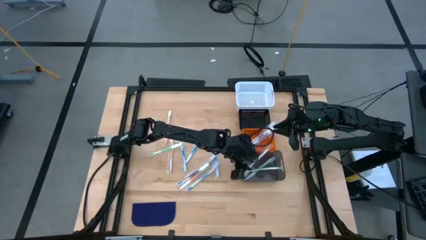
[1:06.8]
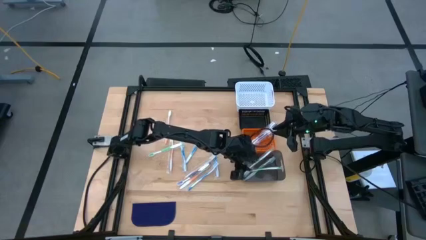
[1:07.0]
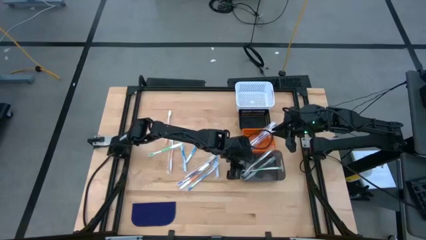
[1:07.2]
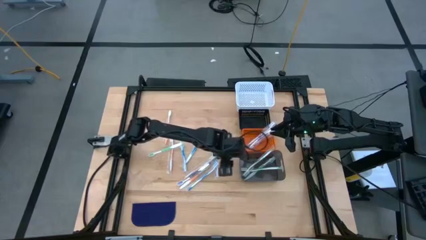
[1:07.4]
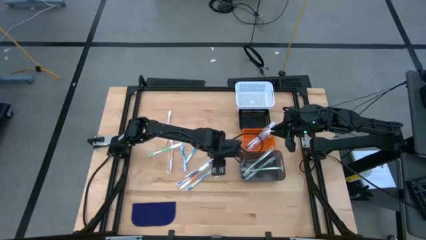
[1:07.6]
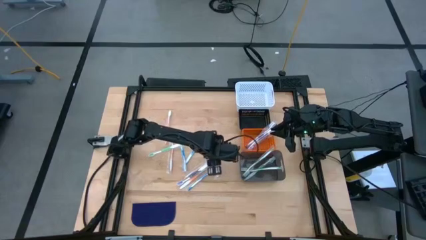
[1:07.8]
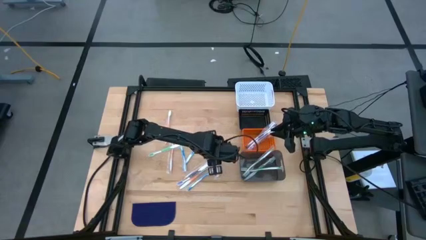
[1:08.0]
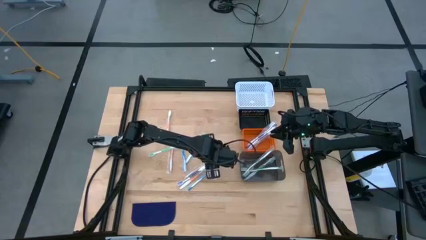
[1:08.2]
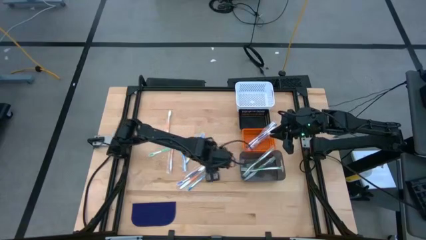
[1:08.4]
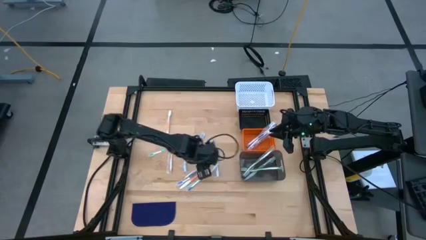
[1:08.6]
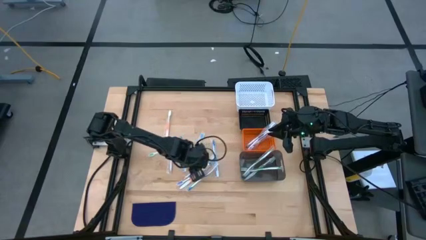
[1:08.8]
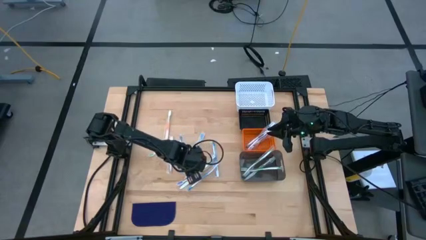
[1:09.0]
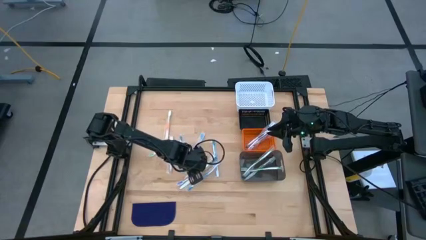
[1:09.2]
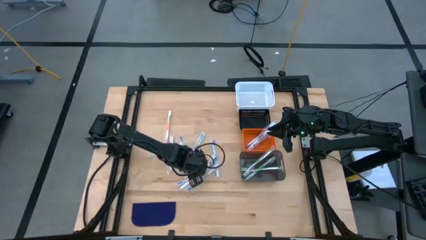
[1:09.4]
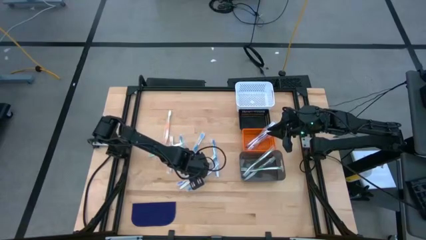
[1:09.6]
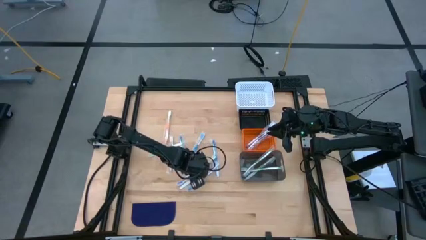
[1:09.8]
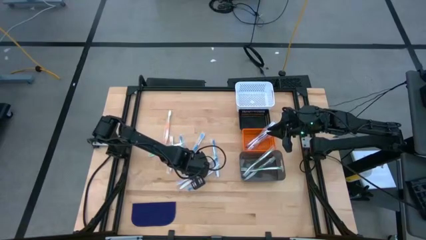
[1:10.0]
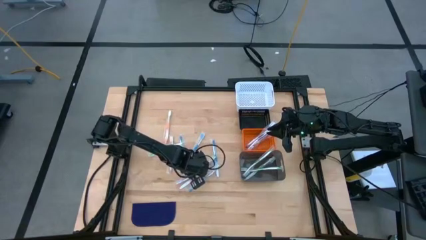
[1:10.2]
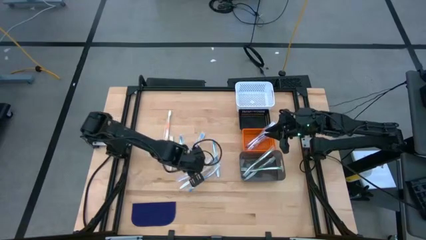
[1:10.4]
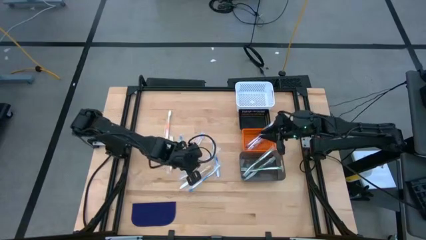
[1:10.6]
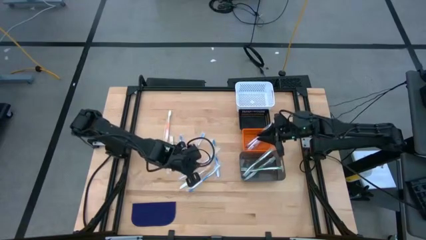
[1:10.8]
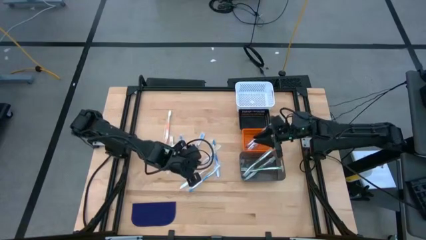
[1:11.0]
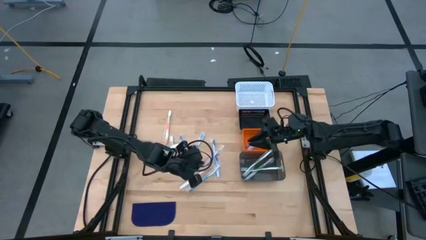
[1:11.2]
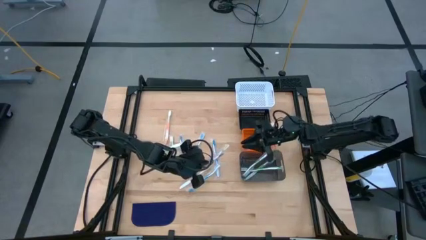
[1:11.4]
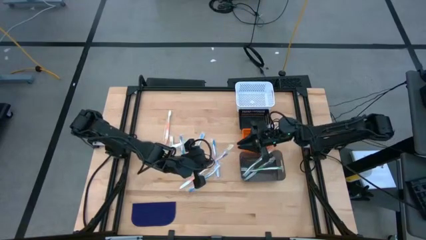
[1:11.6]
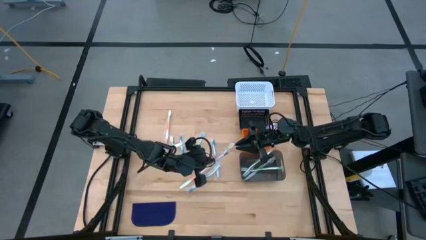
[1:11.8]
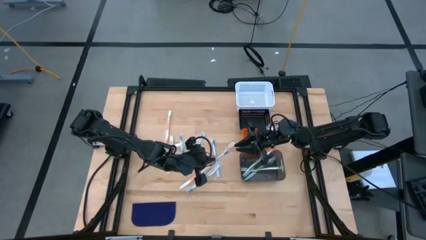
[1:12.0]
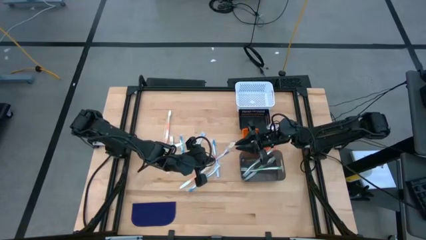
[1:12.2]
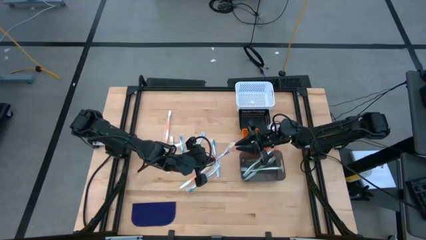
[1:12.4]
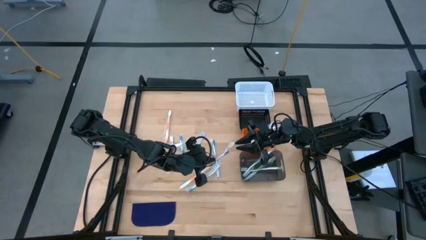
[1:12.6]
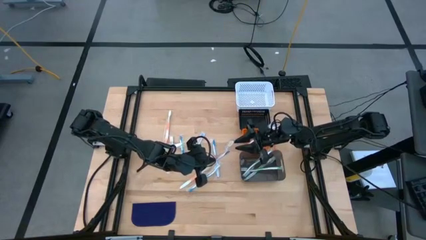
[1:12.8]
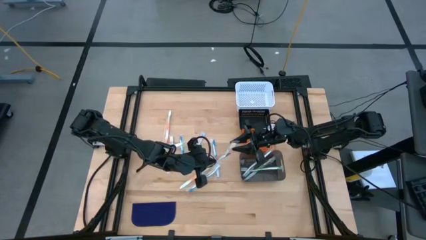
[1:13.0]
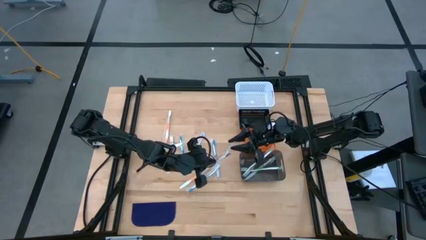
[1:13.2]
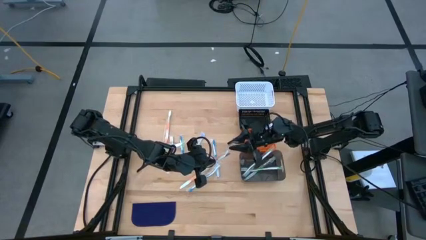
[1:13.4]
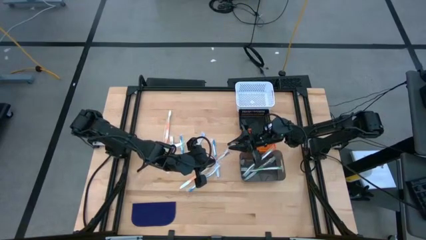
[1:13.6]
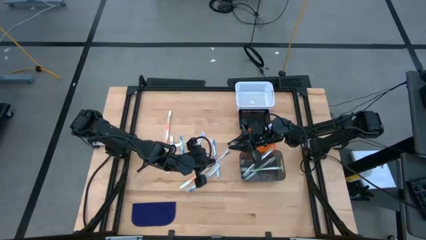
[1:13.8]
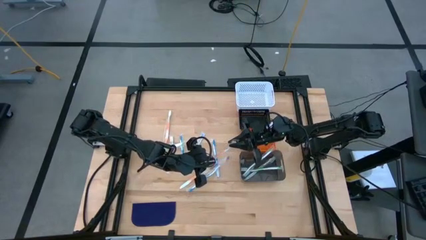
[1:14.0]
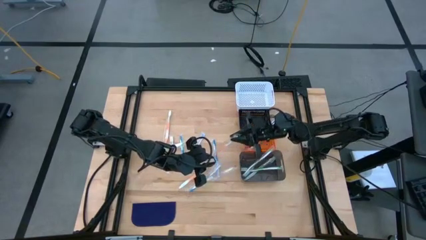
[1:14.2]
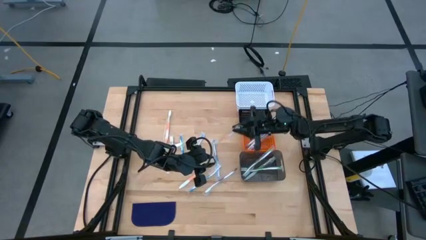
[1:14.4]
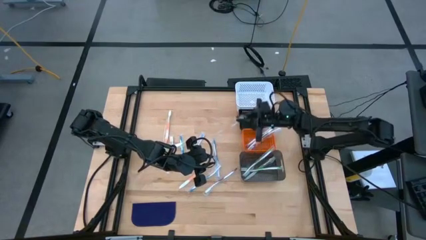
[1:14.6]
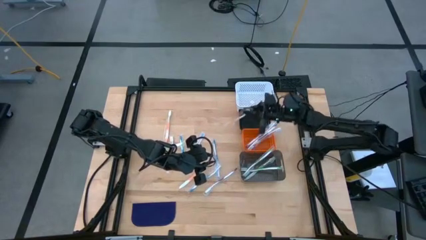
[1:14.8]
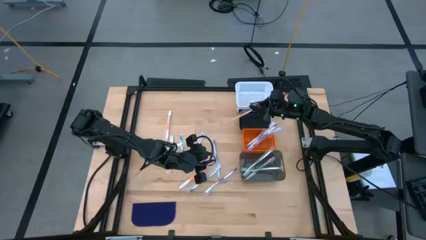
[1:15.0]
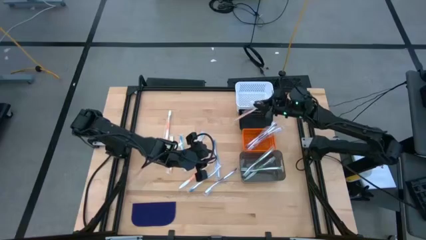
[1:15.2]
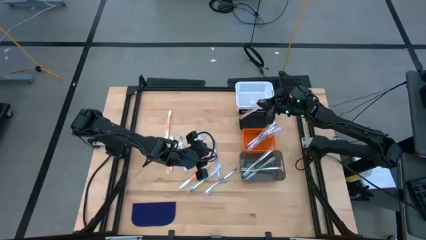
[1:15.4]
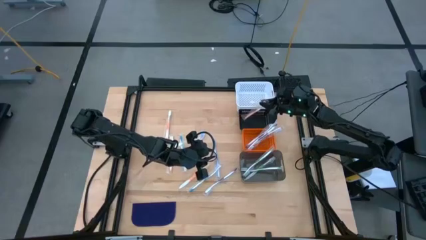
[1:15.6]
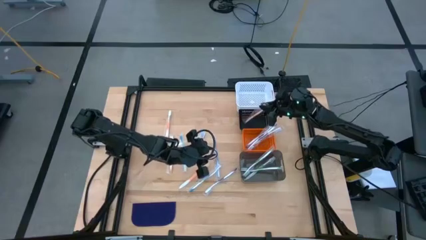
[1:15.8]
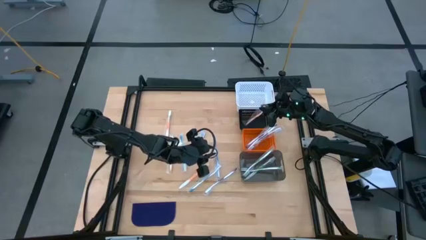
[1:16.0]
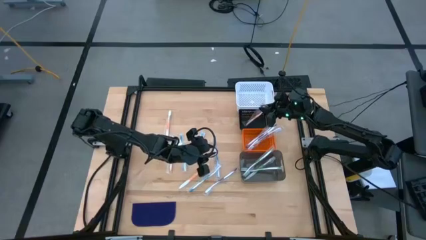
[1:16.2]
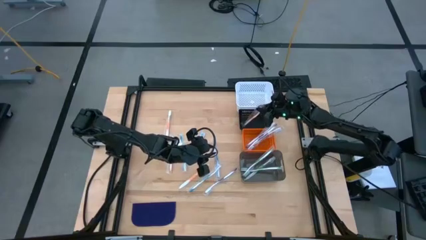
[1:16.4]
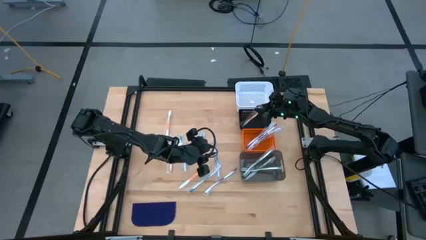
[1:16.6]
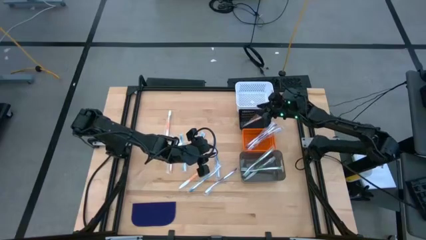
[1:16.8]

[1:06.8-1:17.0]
Task: Pick & Place Toothbrushes
Put the orange toothbrush into the black bin

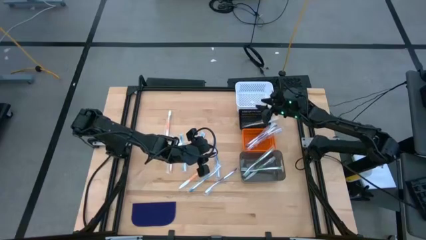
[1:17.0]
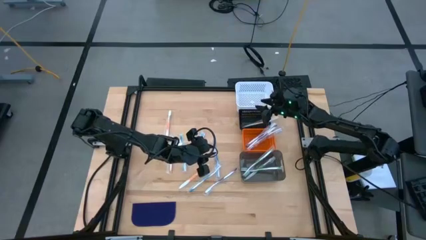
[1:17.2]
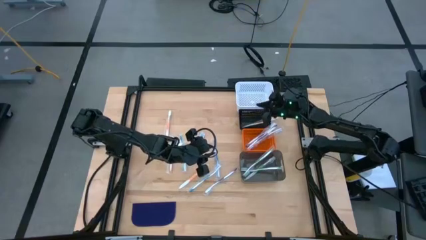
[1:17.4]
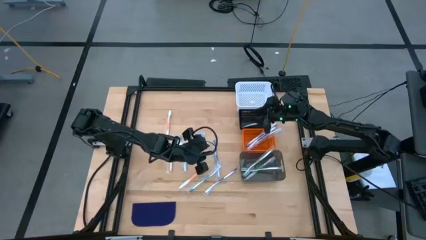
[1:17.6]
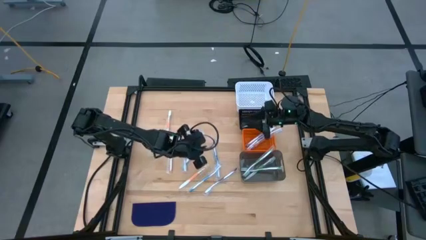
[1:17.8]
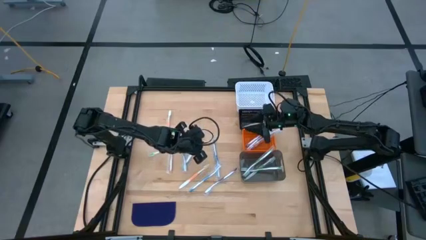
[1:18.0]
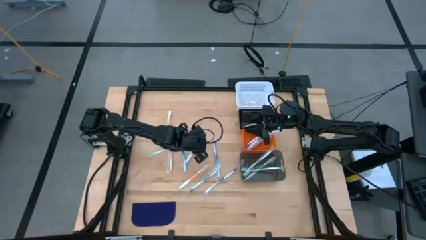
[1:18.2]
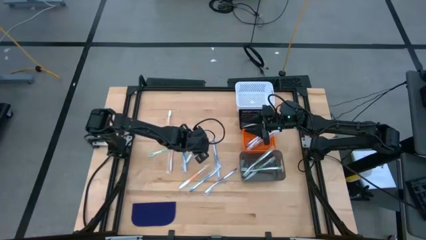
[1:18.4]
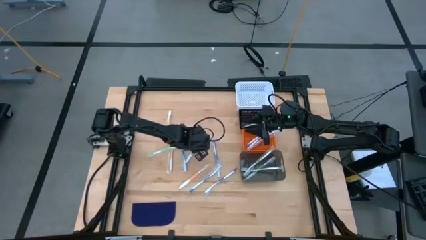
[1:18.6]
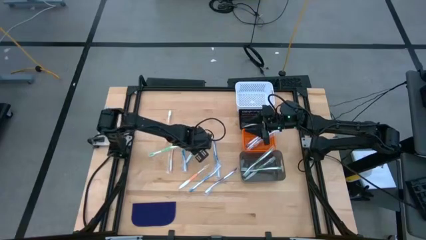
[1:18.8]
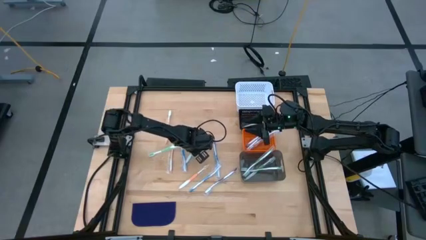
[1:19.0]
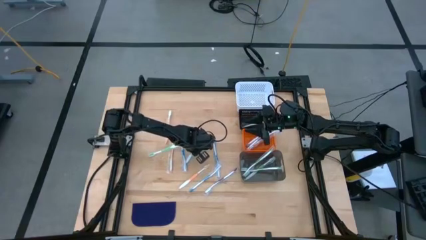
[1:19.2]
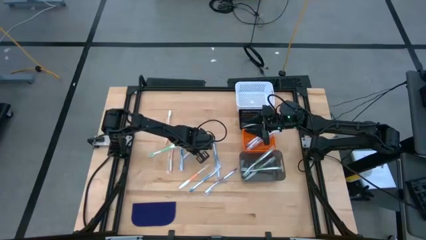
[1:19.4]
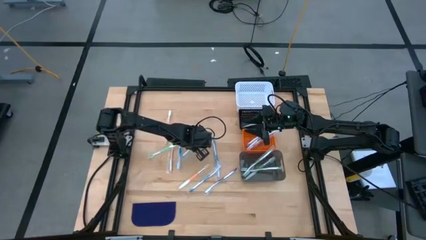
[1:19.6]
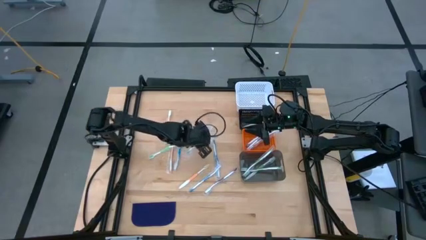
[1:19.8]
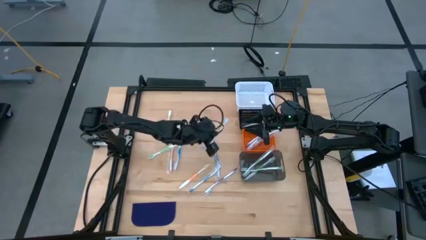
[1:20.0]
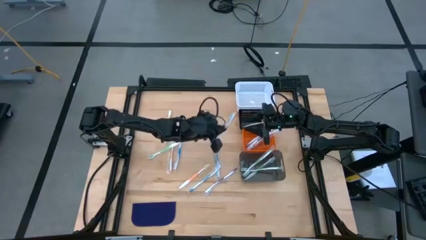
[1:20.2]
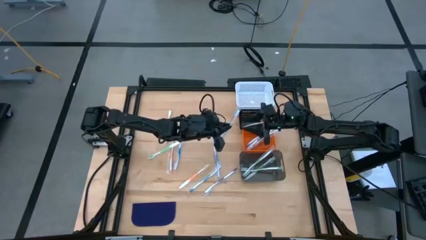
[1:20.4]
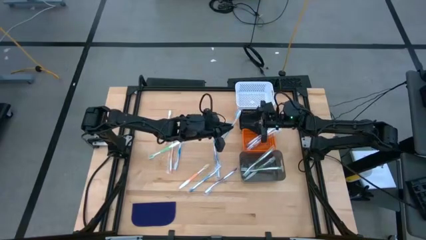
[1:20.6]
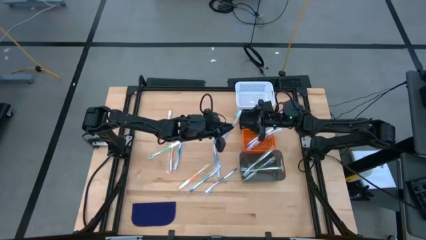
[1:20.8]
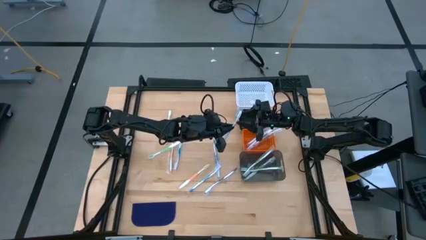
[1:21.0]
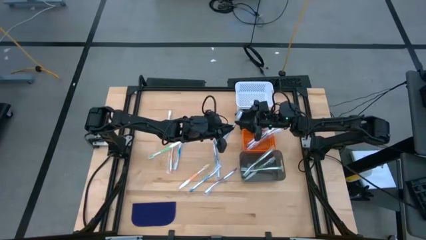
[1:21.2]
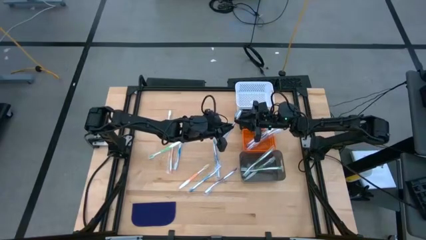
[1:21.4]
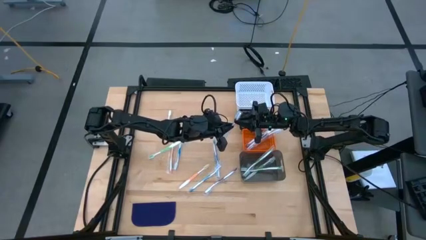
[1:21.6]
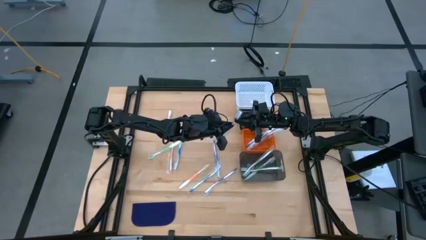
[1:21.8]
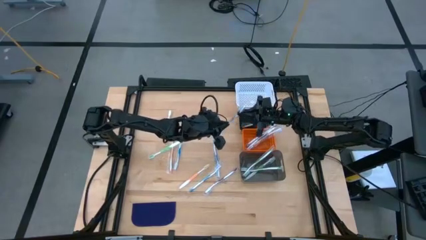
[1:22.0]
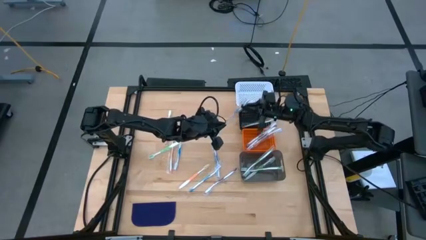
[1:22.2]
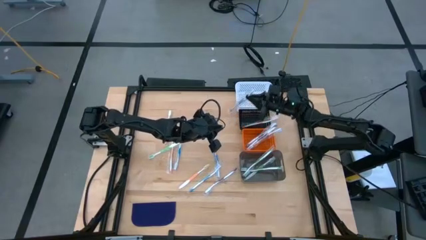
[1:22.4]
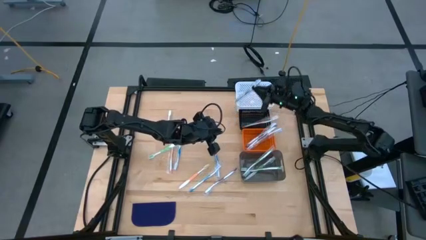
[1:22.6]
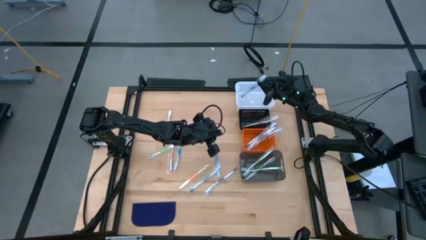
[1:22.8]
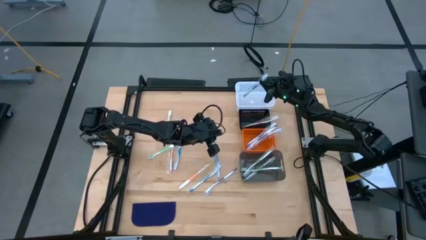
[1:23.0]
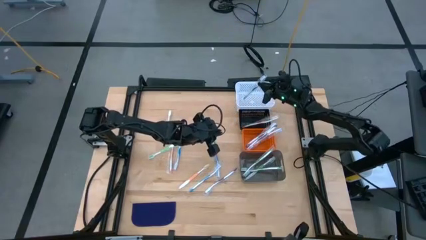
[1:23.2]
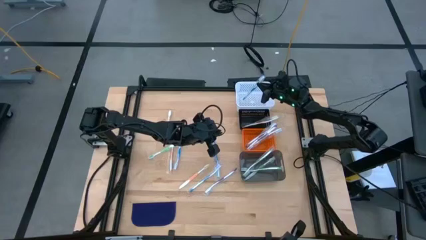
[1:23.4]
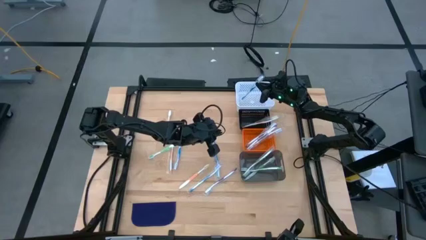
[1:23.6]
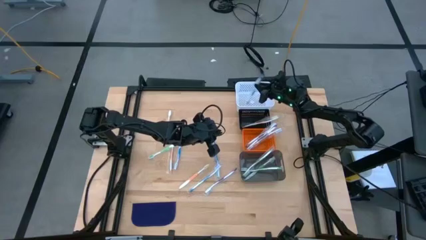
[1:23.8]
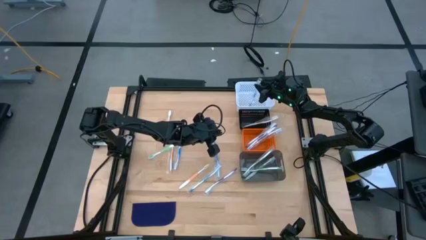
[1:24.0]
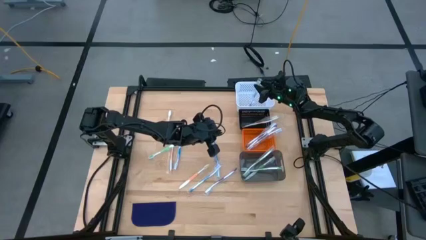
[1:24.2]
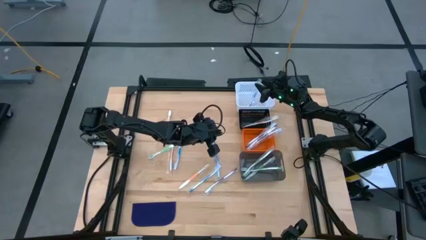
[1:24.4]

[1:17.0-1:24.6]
Put the blue toothbrush into the white bin
